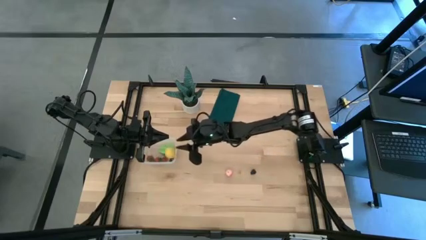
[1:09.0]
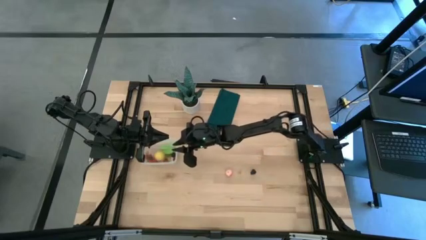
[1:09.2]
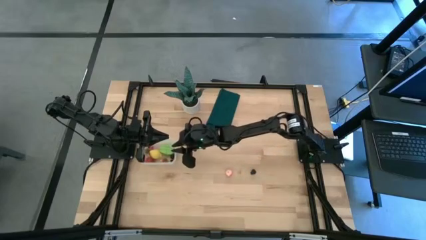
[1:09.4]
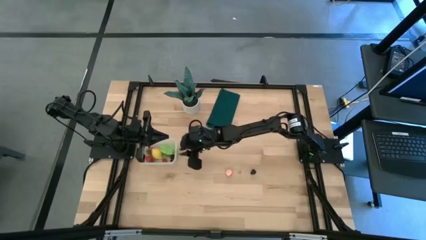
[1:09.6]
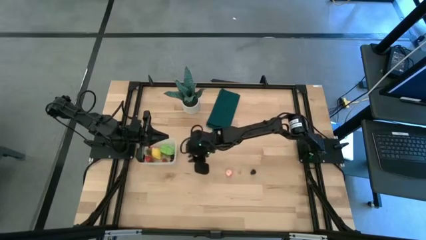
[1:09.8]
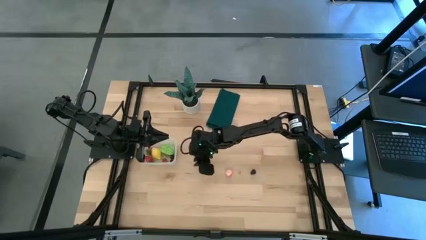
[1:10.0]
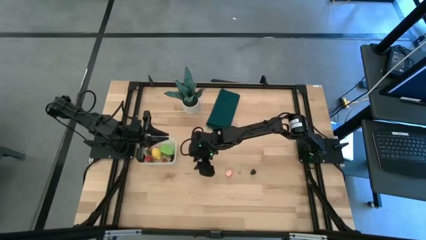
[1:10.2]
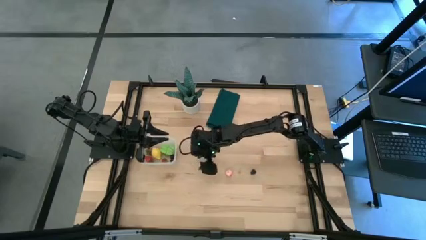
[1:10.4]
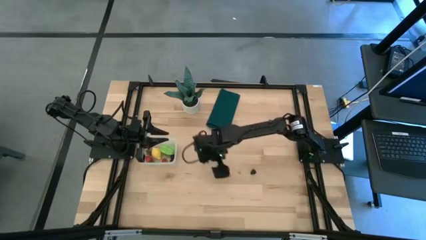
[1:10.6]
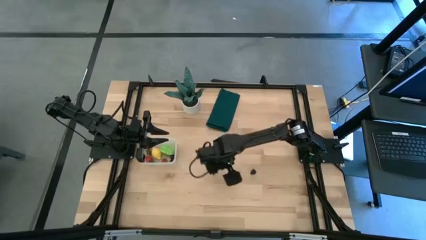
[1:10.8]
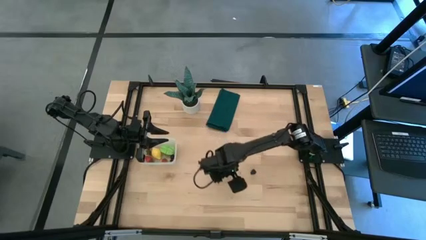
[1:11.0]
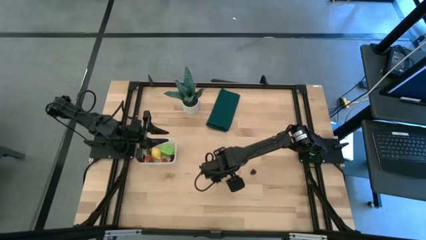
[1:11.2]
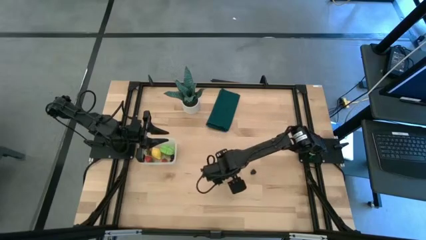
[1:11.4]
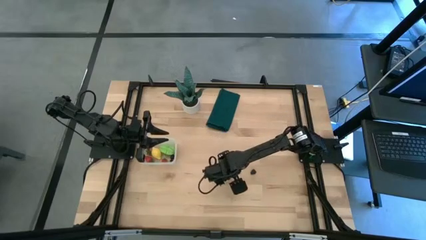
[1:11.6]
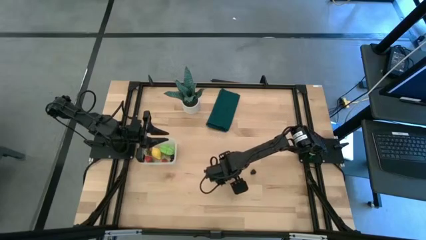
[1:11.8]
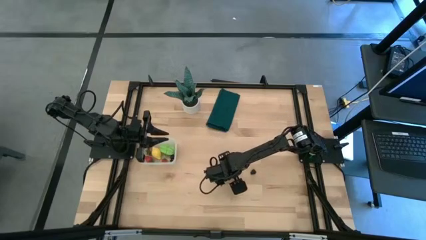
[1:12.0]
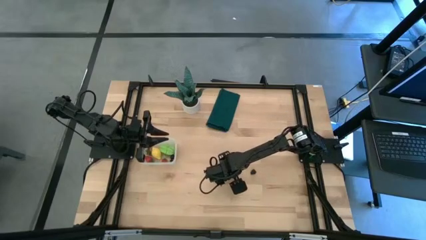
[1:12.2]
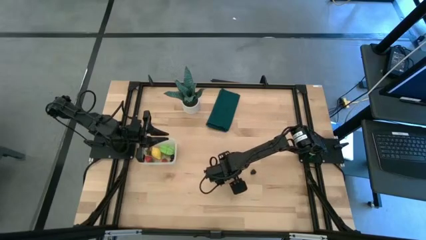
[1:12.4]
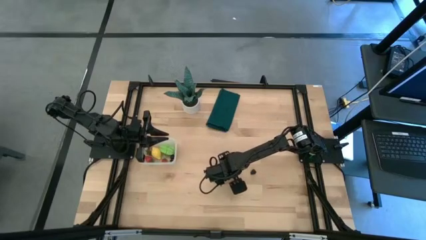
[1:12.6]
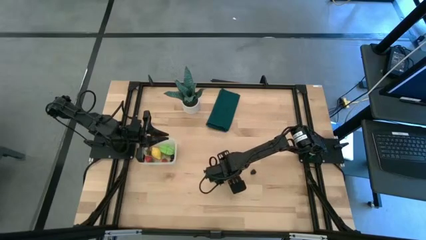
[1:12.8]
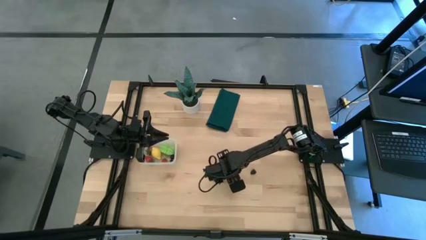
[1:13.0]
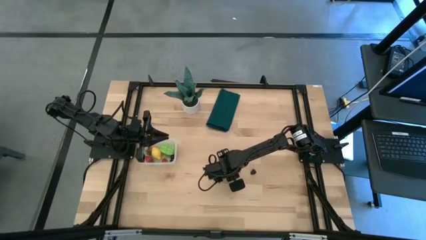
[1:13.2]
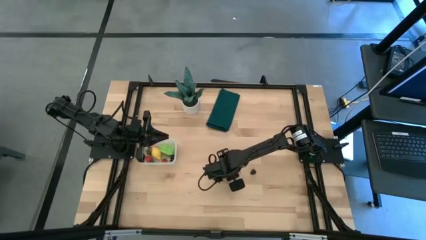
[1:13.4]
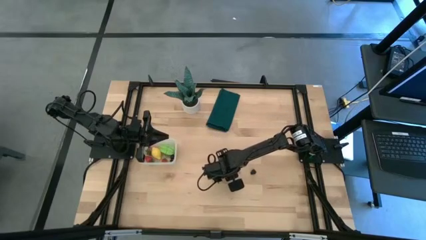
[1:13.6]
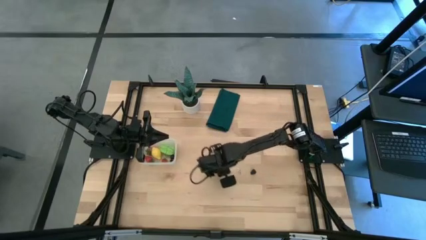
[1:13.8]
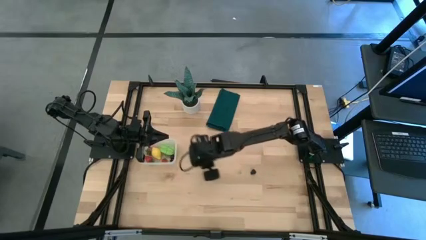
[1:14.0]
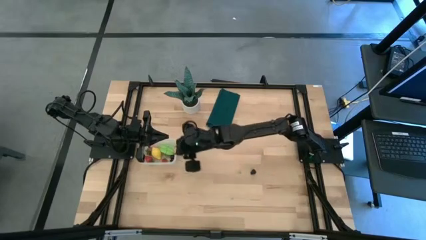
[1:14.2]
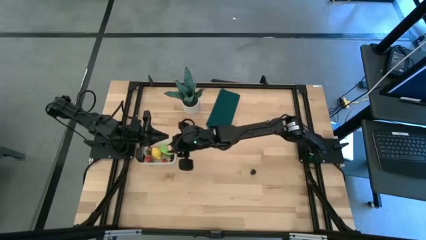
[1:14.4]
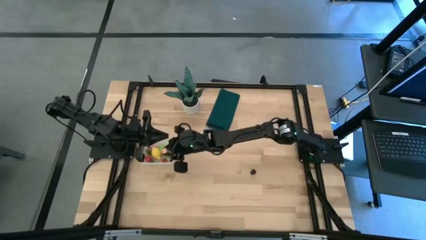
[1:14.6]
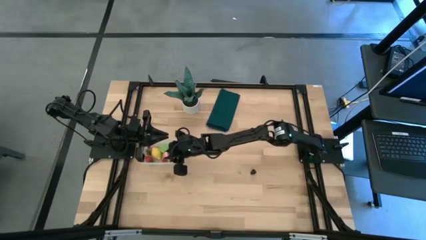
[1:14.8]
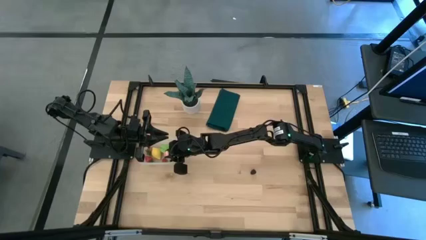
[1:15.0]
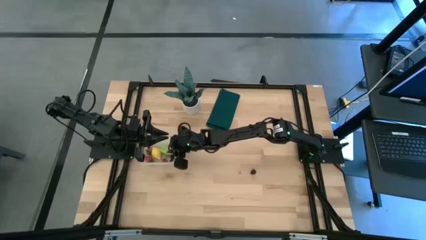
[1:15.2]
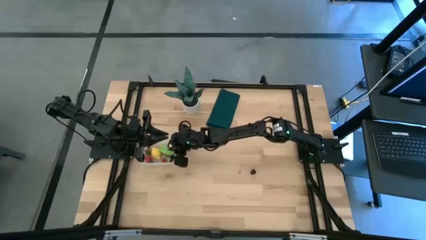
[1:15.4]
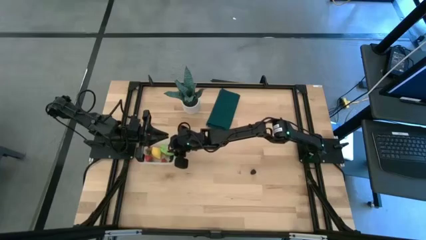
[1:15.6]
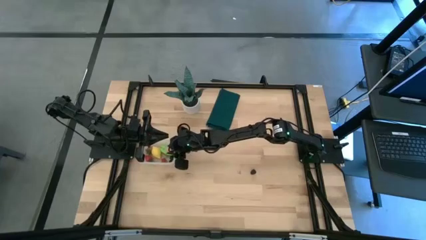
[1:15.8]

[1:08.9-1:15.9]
Task: Pick and placing Produce into tupperware
Put the peach into the transparent bin

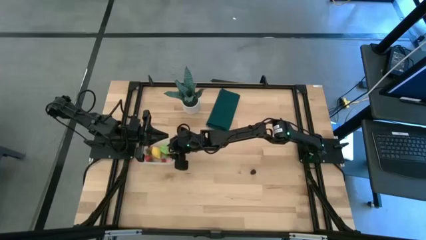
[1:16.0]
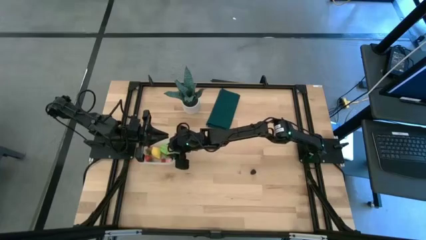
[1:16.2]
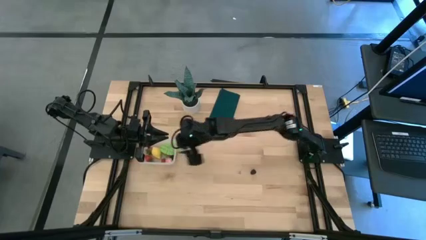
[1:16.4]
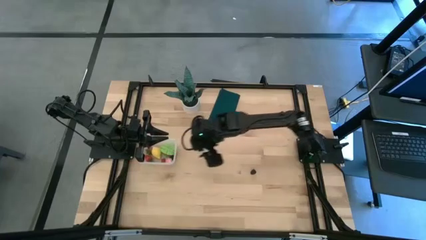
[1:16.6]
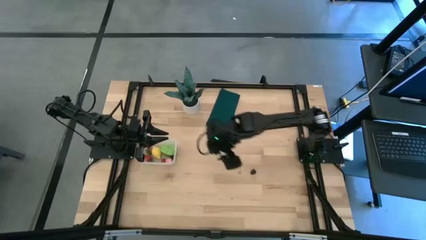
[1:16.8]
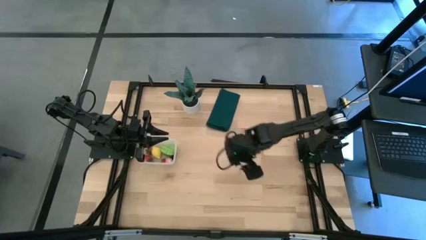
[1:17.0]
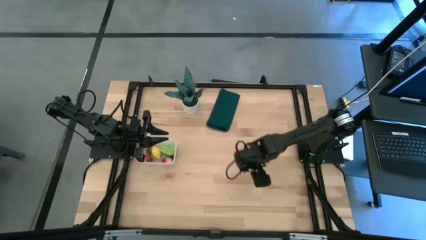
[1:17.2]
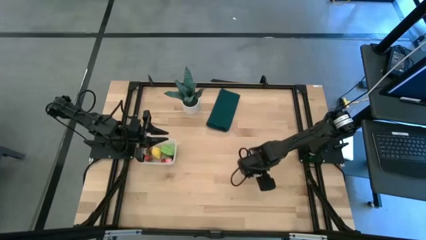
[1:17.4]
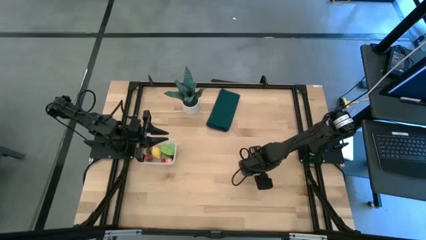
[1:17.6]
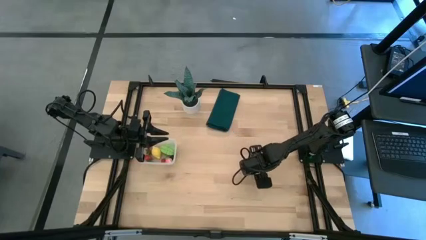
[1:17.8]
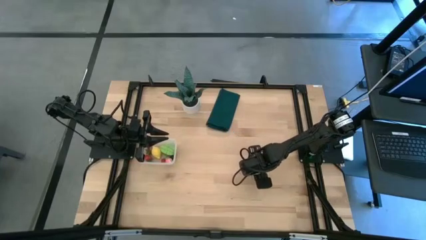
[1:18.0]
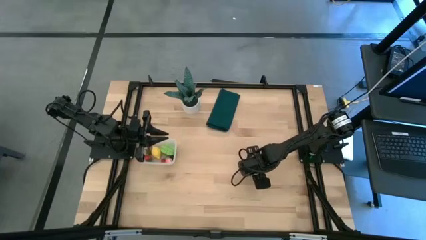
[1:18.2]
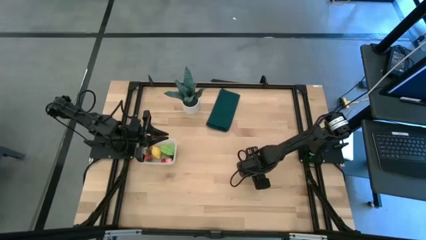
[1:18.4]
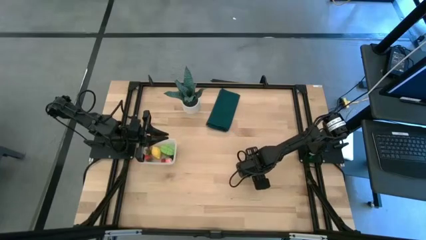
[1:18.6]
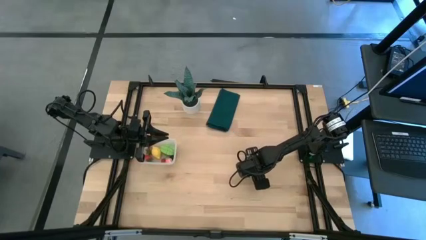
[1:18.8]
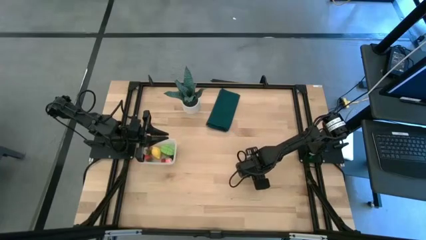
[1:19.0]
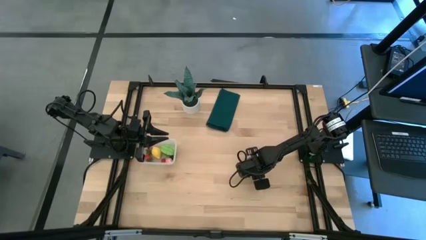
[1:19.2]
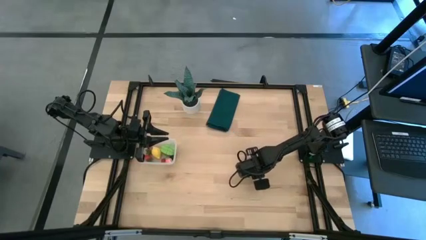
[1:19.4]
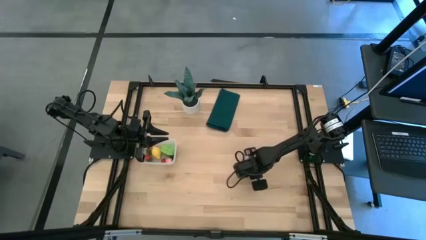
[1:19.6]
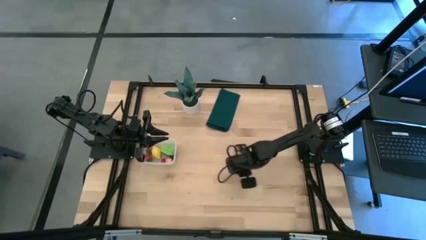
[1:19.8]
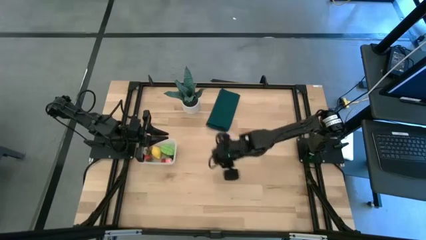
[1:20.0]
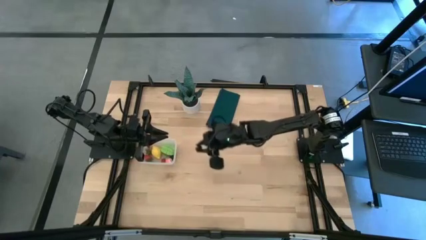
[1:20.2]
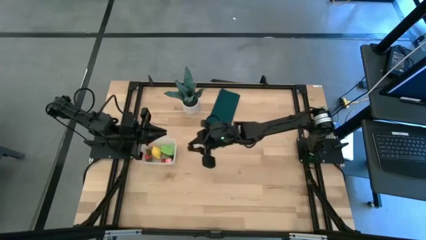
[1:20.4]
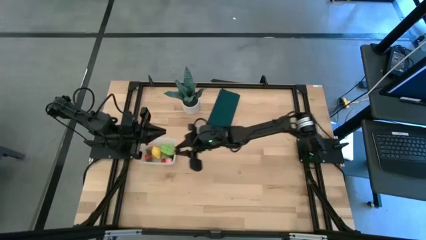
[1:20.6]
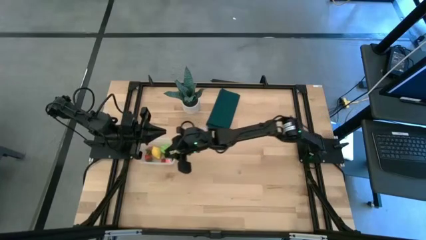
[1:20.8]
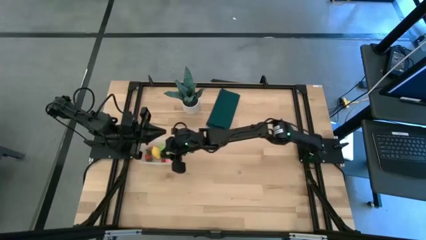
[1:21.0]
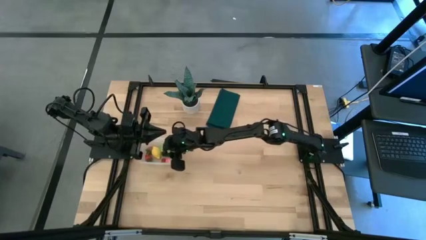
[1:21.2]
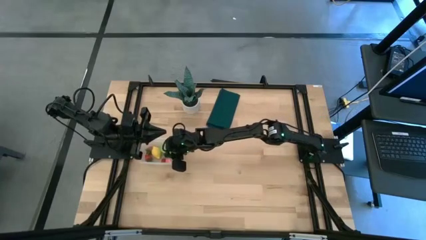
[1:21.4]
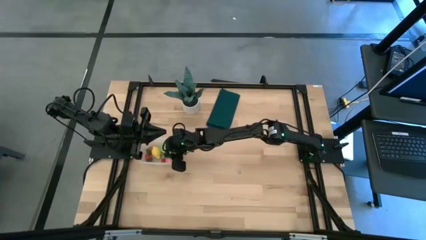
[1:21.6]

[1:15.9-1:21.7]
Put the blackberry into the transparent bin

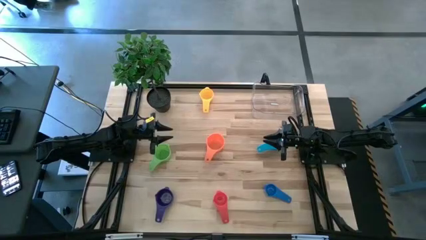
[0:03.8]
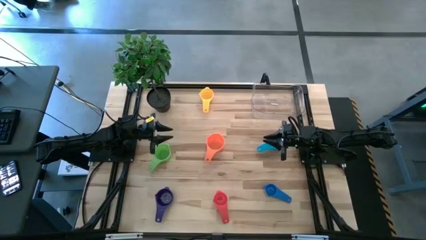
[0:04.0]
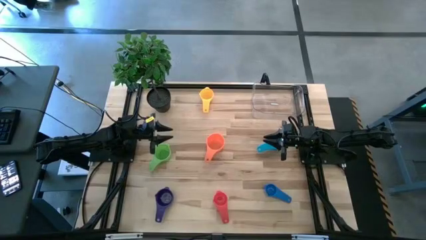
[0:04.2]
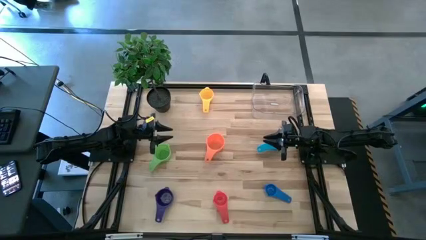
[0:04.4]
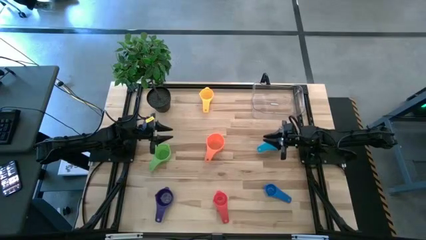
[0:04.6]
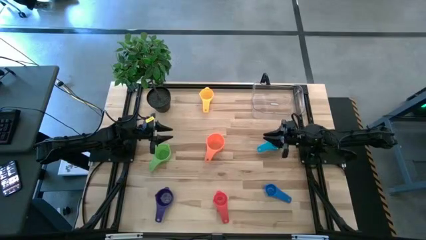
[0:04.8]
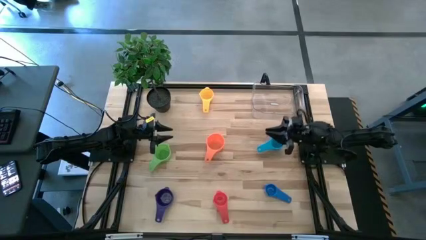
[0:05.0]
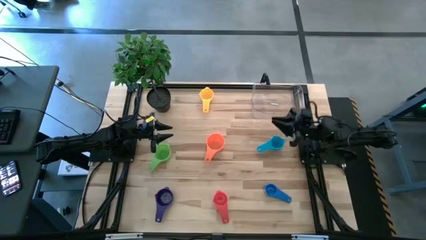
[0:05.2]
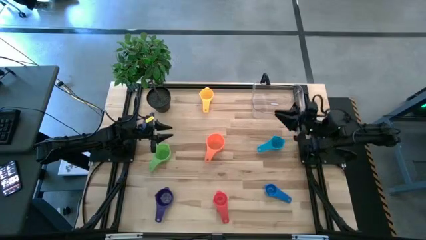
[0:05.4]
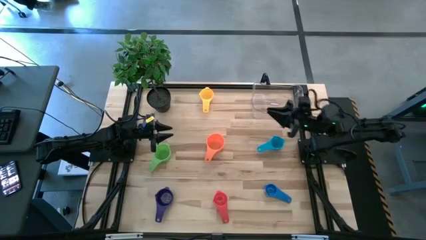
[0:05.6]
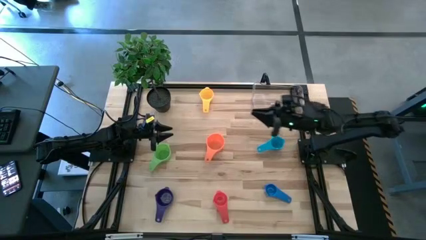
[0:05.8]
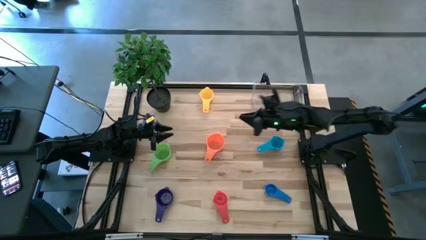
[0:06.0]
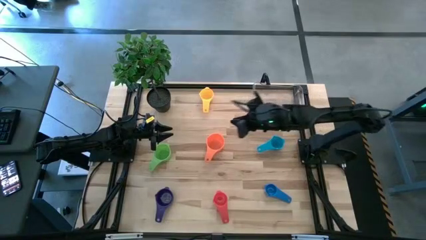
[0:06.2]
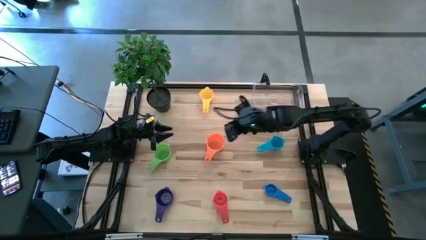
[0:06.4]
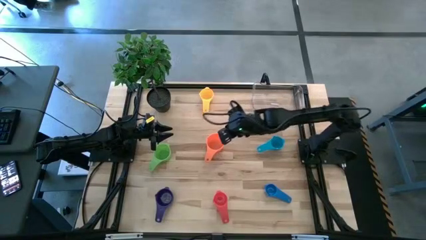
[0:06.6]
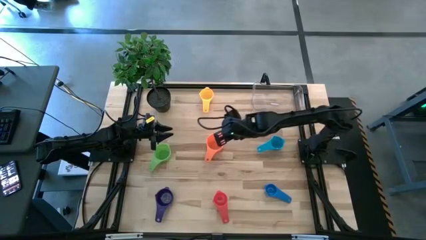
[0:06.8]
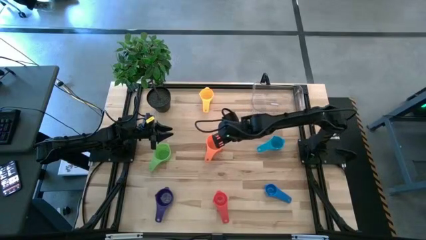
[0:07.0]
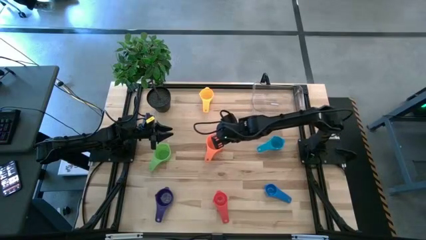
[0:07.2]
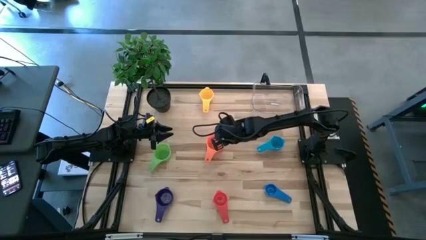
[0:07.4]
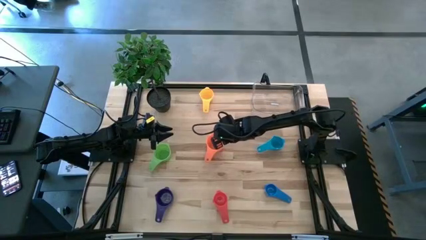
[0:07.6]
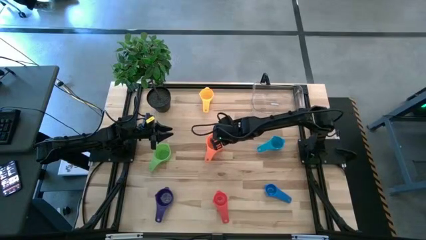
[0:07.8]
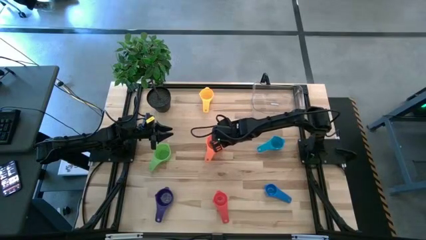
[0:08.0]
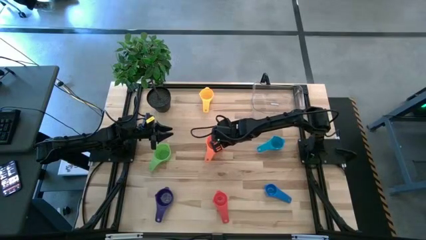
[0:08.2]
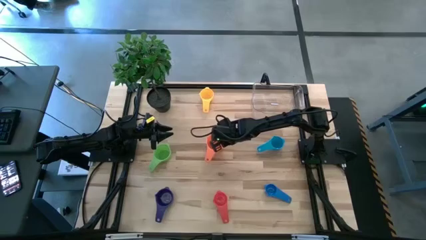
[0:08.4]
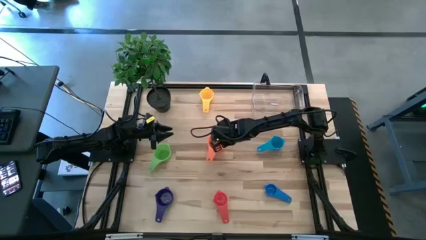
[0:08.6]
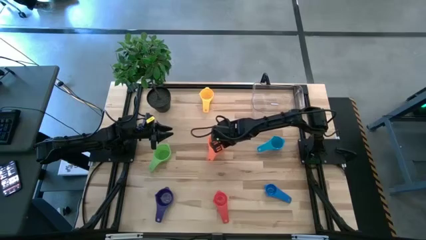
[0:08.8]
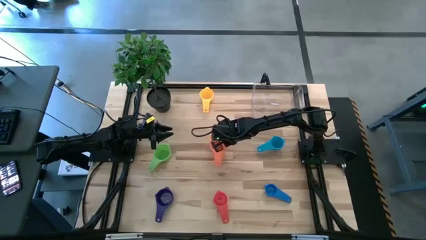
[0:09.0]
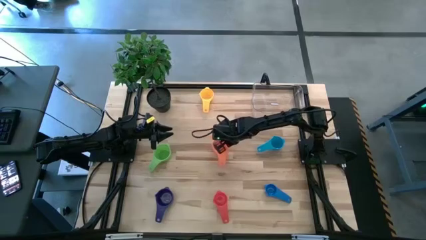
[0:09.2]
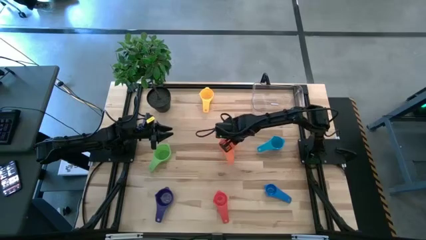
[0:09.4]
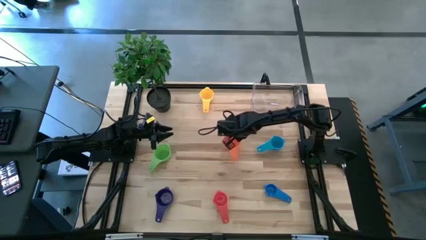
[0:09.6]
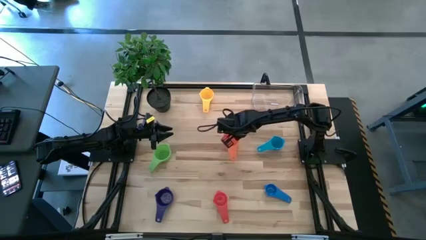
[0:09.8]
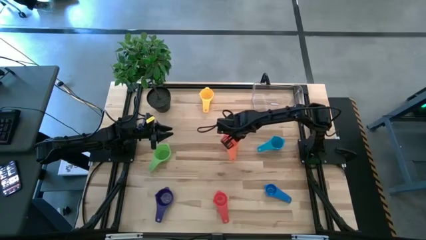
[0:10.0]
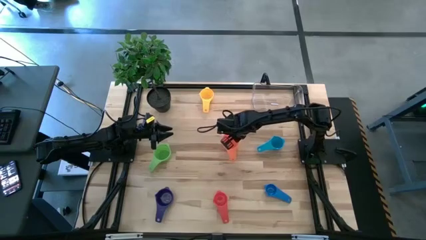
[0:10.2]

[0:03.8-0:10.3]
Task: Nest measuring cups in basket
Adjust the orange measuring cup
